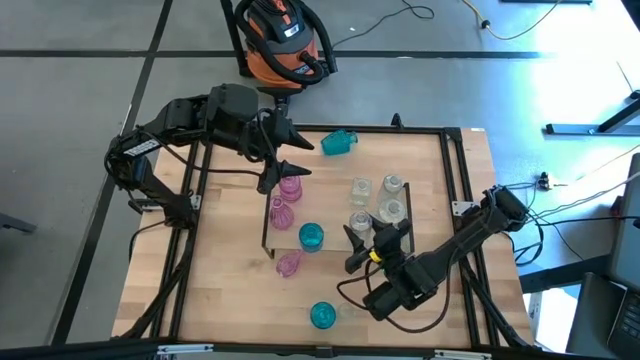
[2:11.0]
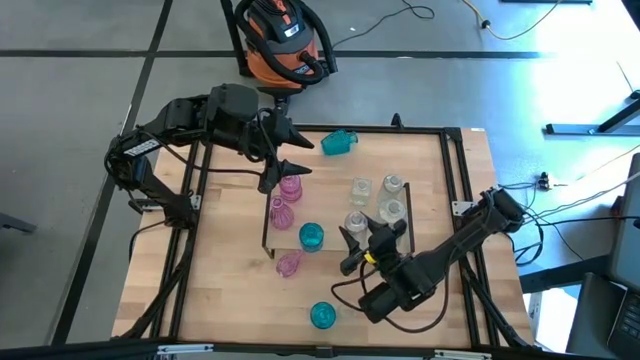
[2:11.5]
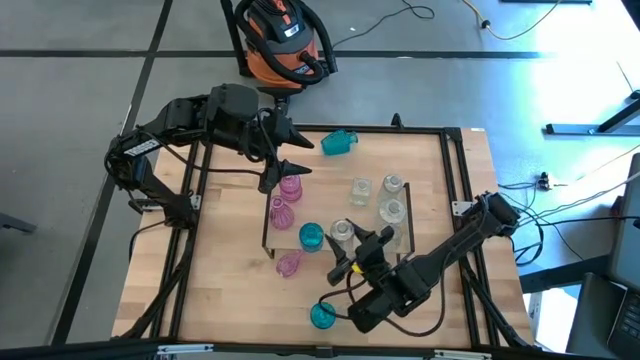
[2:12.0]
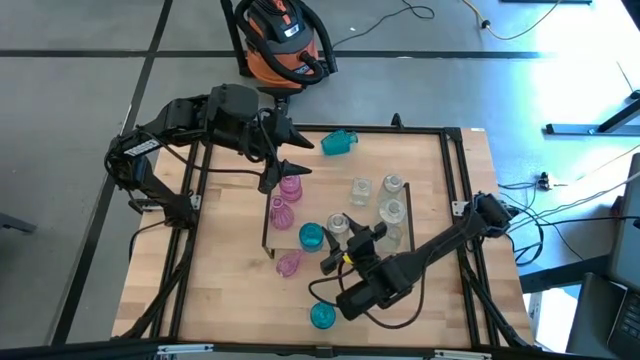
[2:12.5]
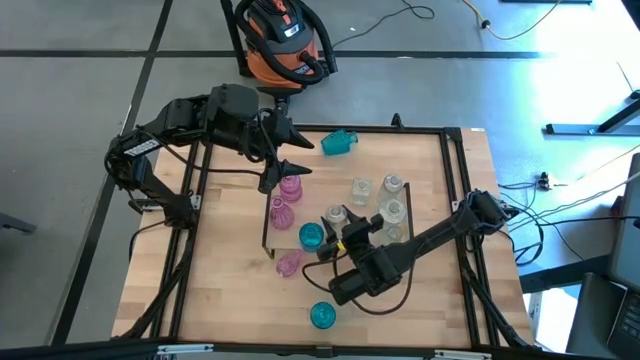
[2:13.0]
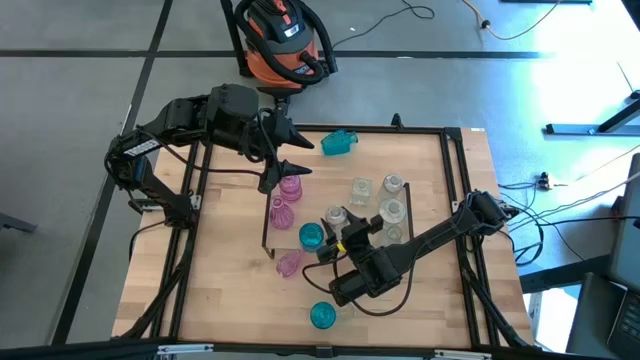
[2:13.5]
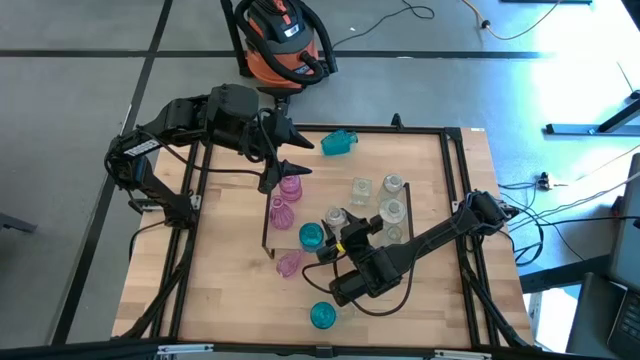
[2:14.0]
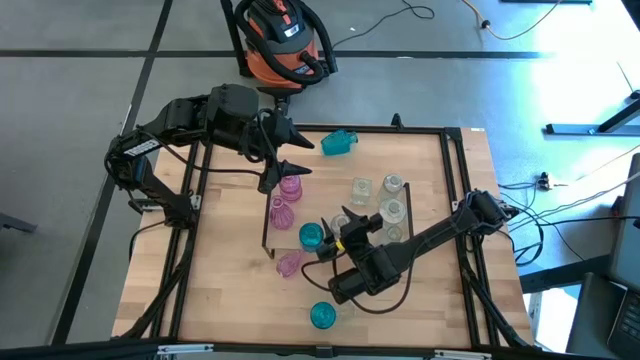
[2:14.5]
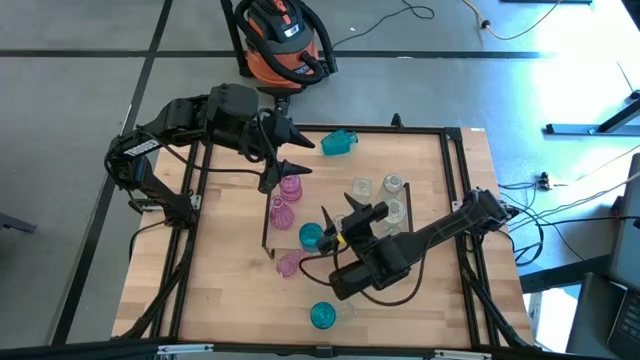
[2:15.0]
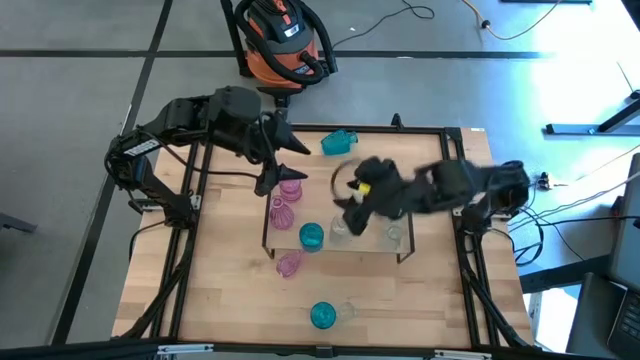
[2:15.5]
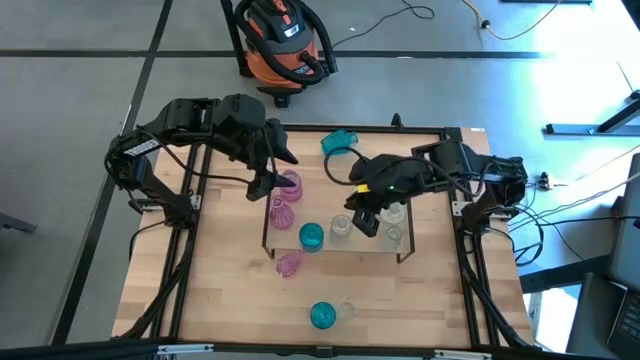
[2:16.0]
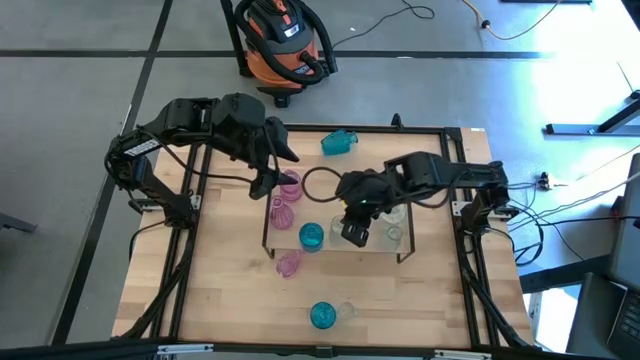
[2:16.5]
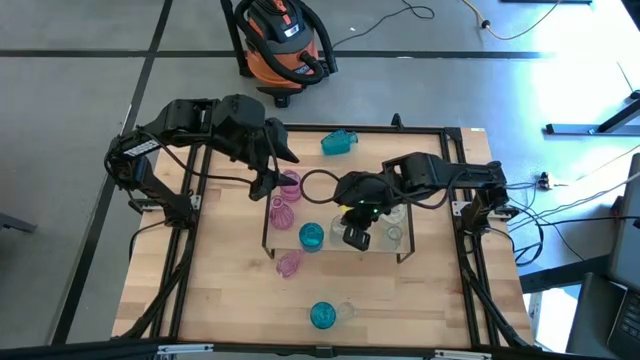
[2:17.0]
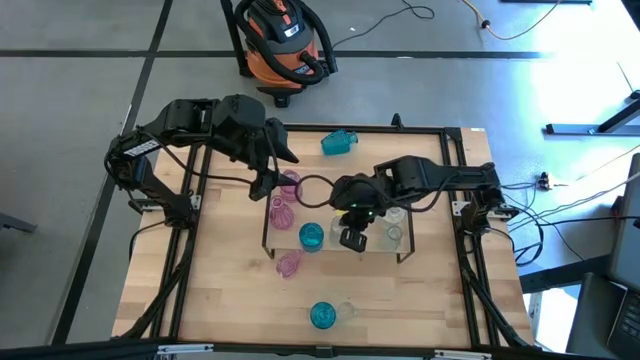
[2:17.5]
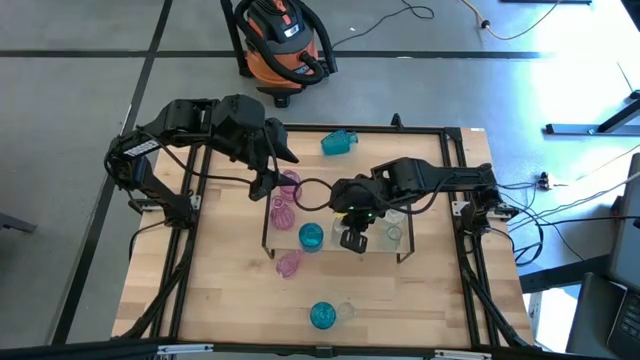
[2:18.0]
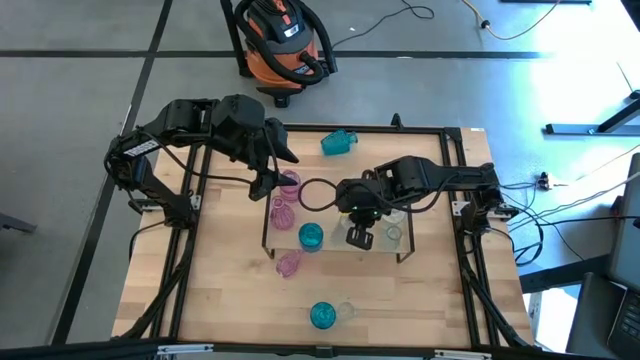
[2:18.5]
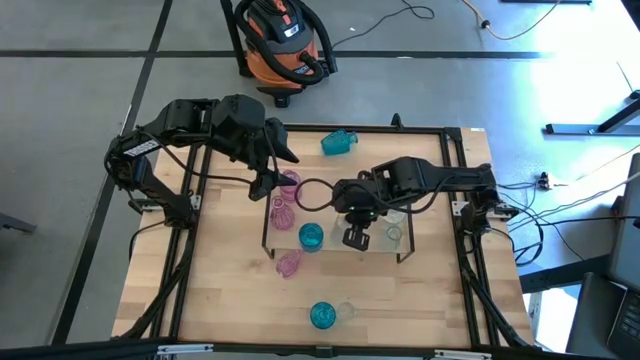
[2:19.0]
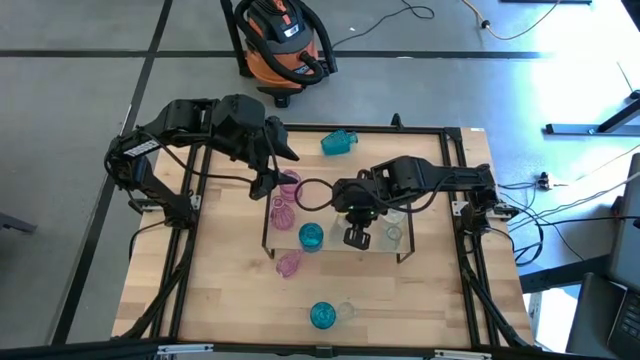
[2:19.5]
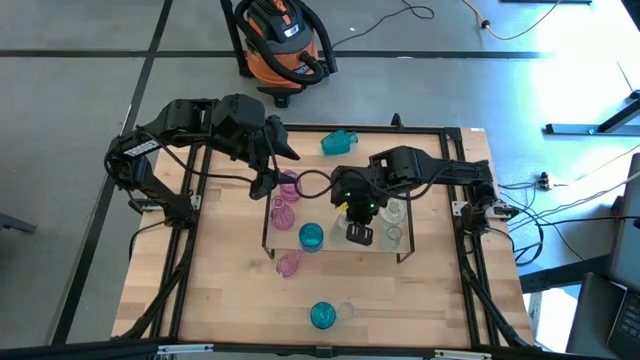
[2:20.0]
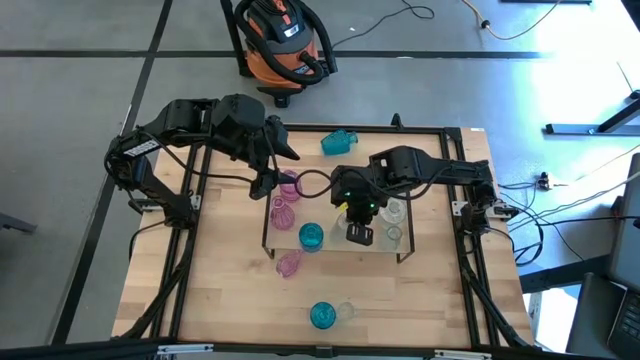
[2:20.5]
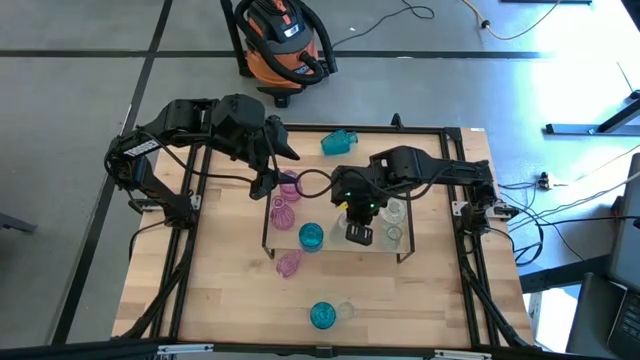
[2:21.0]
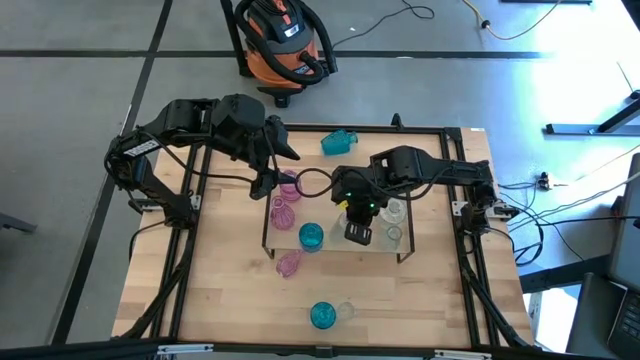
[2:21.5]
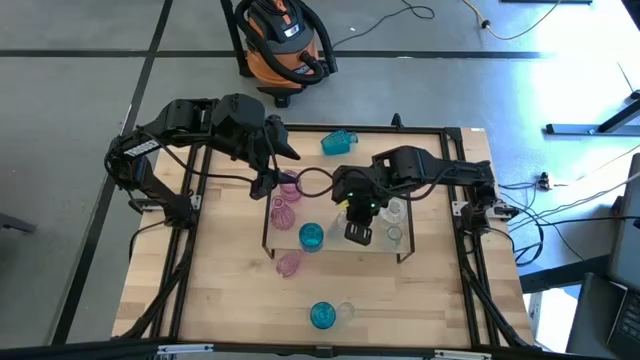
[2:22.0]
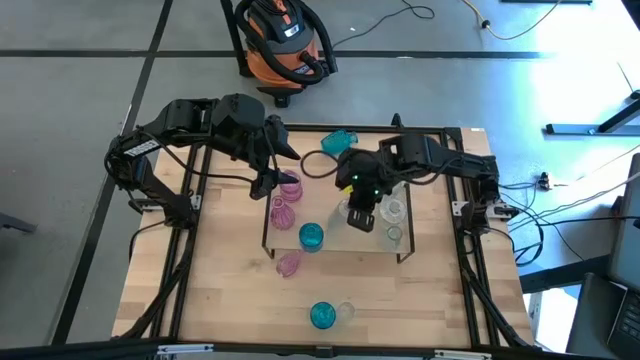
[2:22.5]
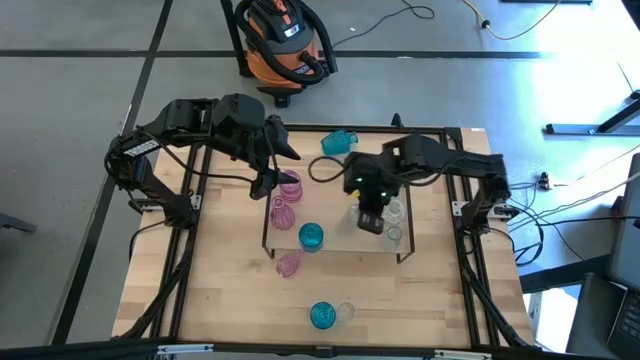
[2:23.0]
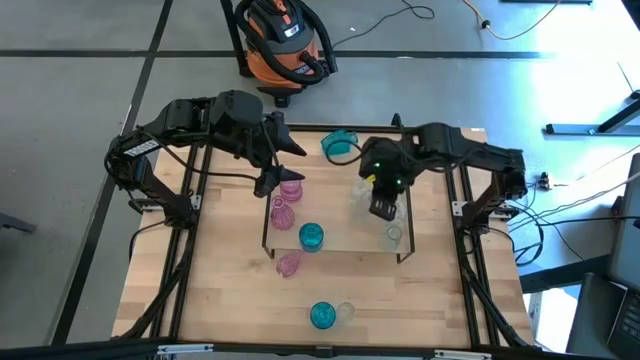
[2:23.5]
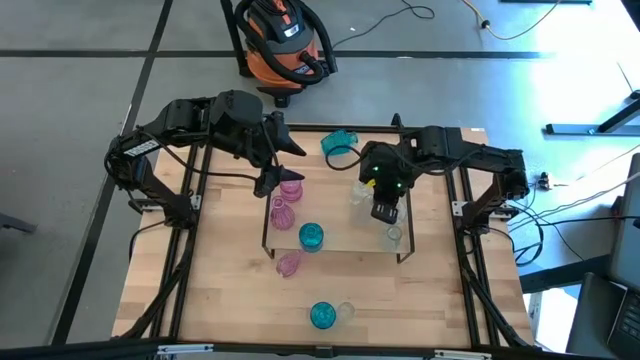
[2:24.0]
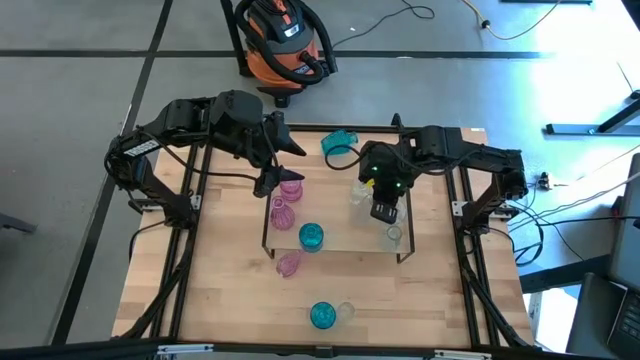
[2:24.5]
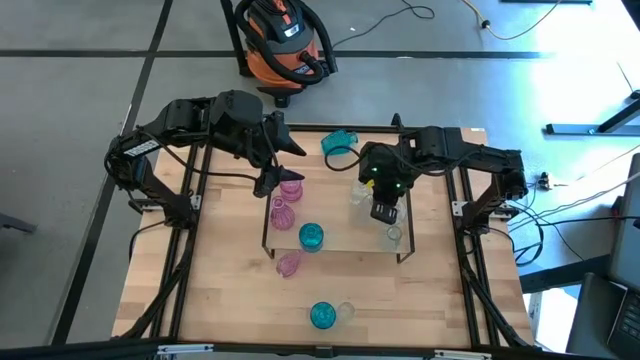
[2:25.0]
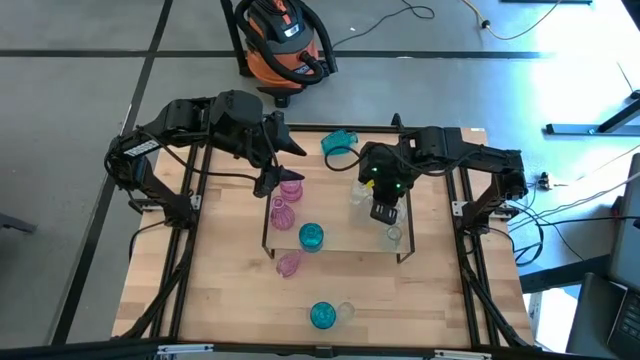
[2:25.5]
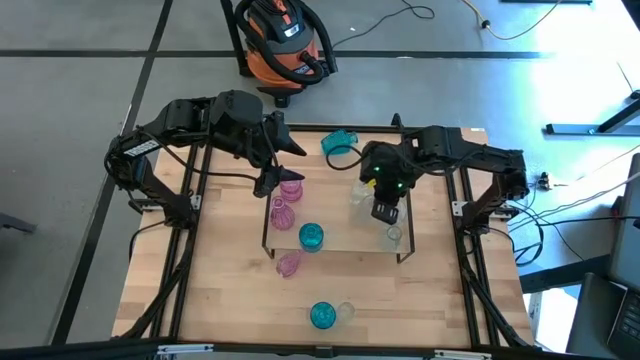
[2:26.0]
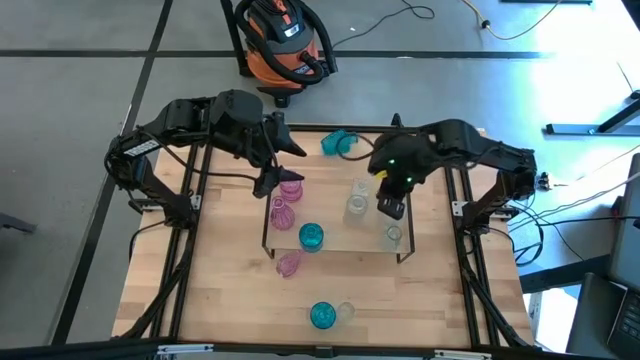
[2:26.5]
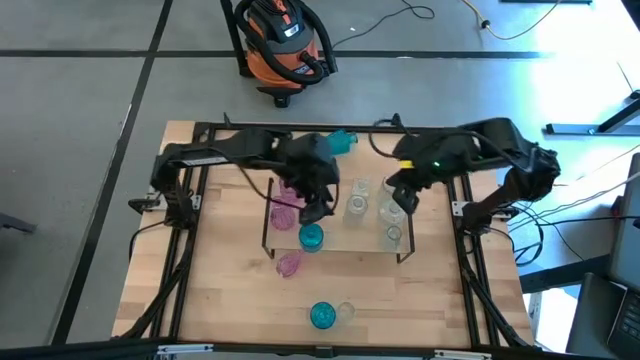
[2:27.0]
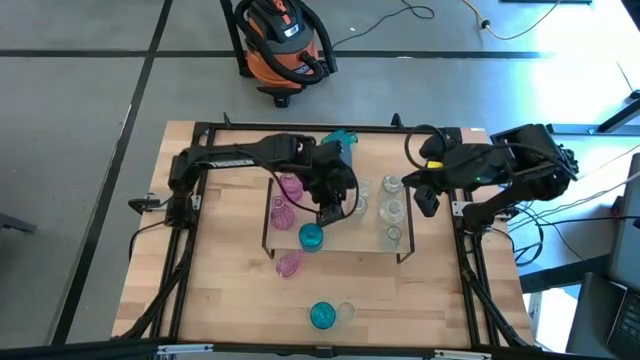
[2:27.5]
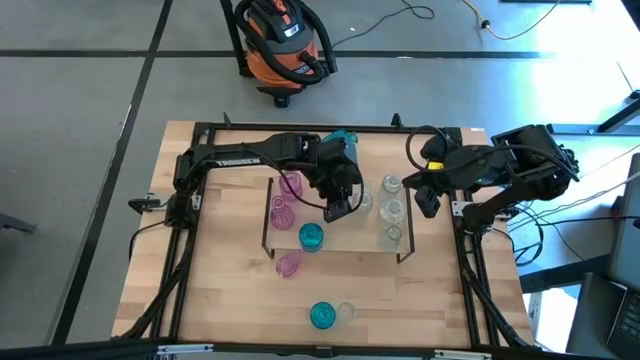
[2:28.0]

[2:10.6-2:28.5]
Task: sort vases onto shelf
Put the transparent vase on the shelf aligned with the other transparent vase

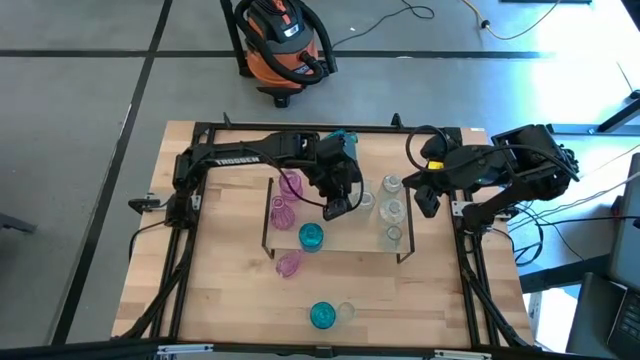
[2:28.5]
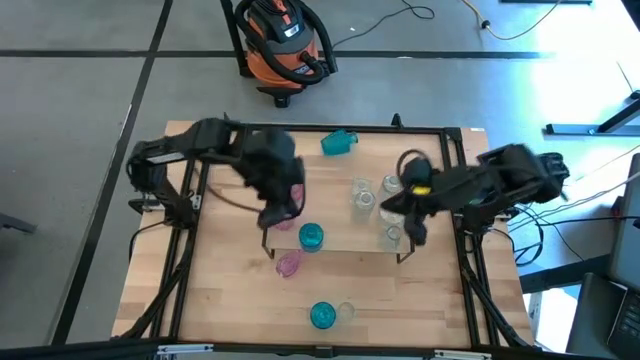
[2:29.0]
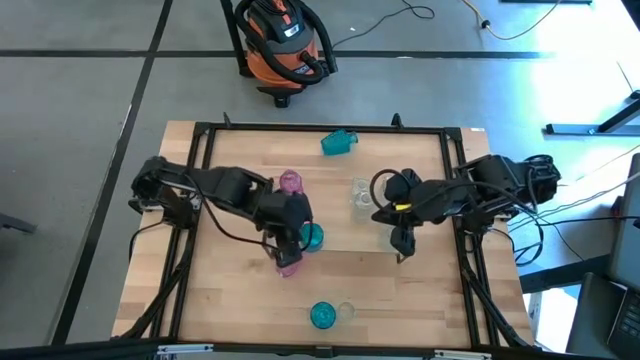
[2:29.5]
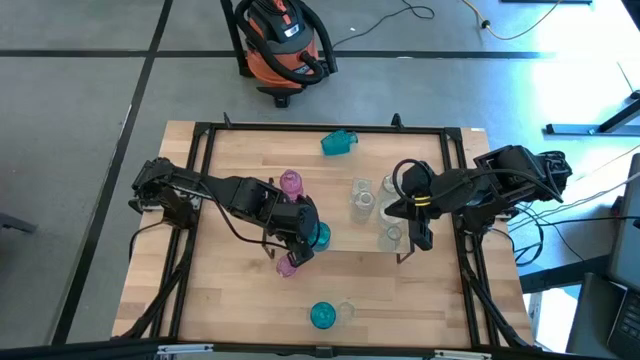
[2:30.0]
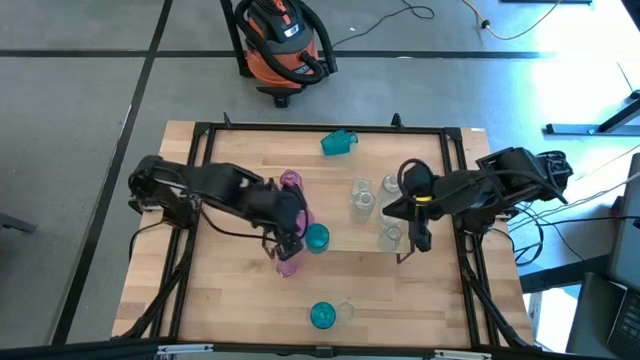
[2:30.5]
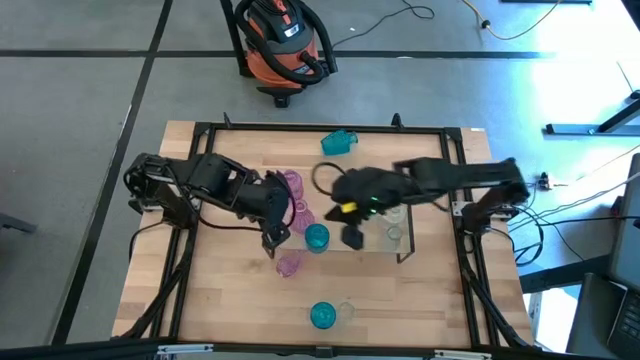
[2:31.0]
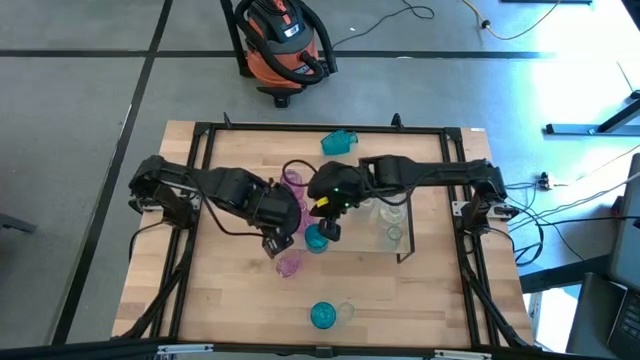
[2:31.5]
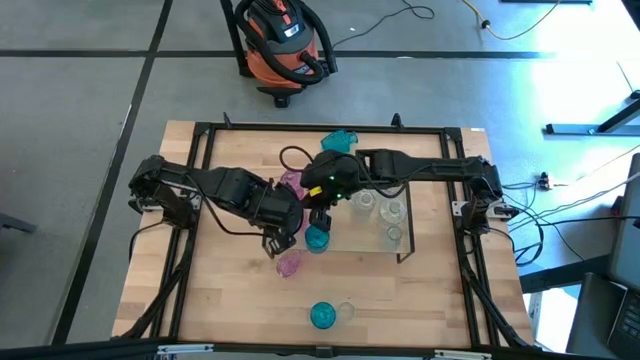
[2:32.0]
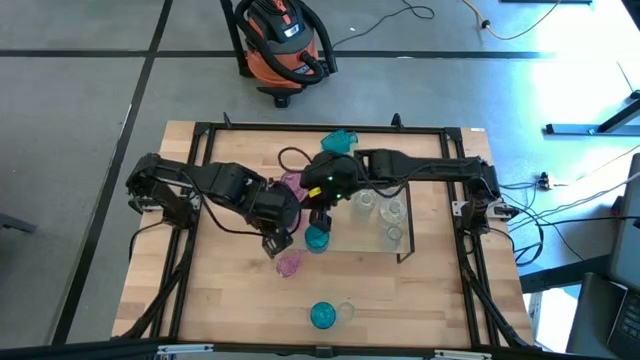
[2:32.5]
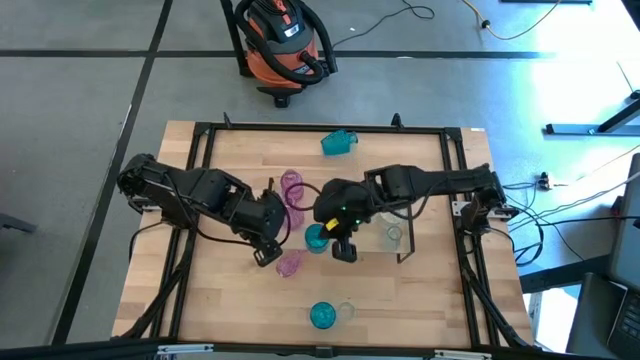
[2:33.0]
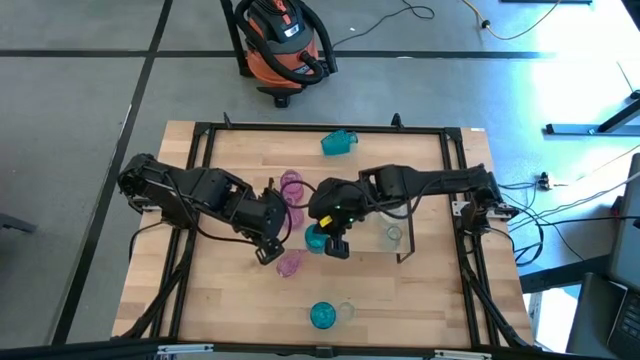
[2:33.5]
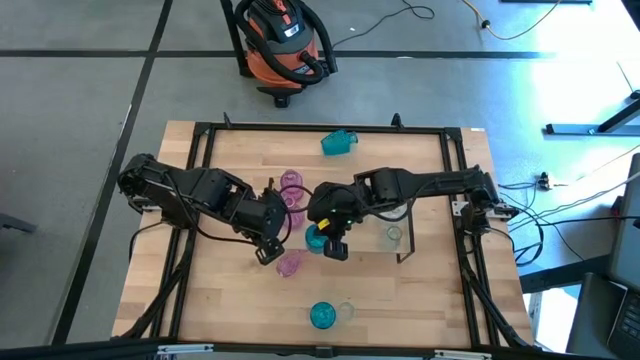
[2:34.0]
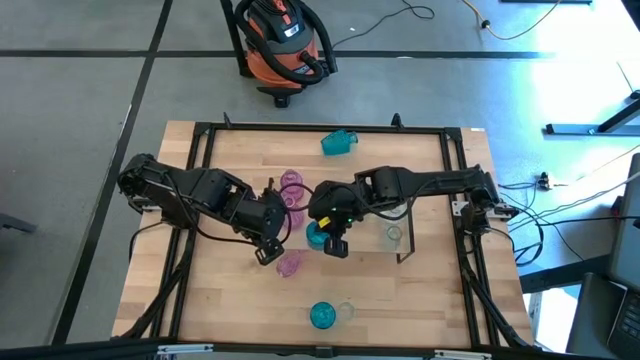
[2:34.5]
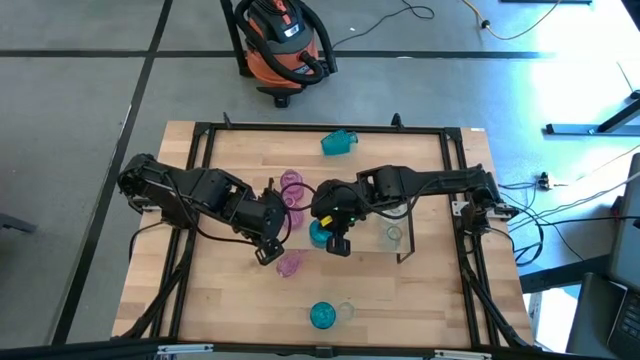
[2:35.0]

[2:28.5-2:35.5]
Adjust the vases on the shelf
